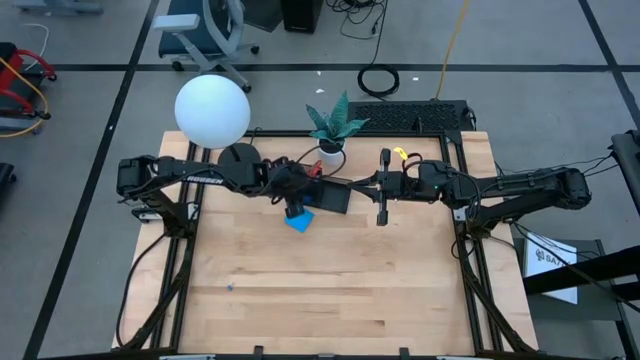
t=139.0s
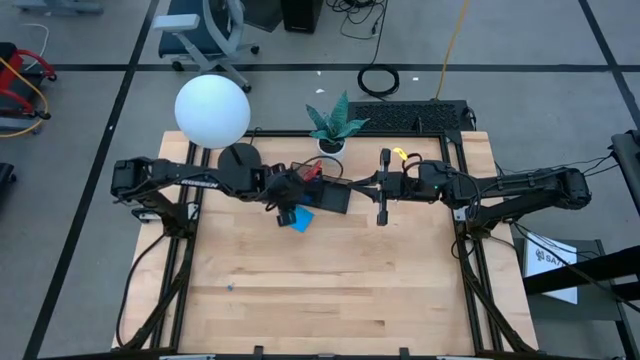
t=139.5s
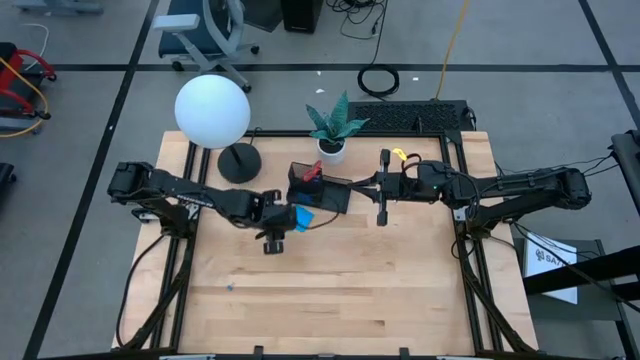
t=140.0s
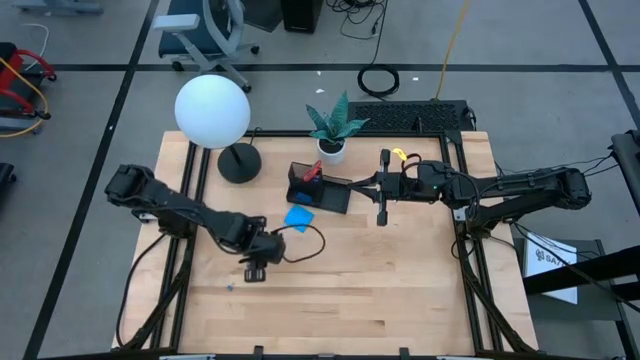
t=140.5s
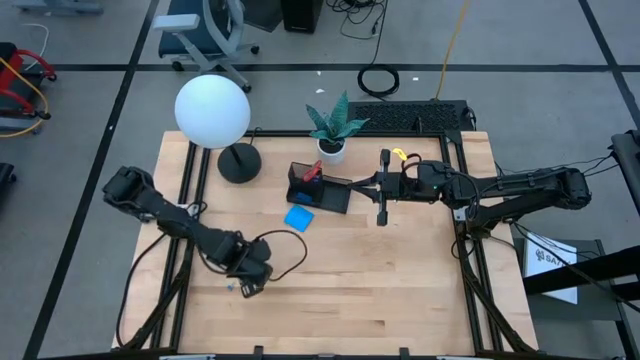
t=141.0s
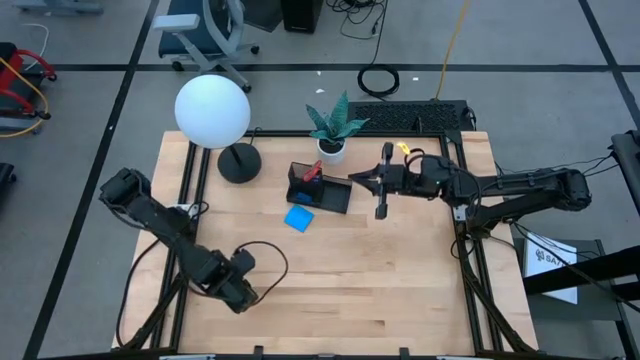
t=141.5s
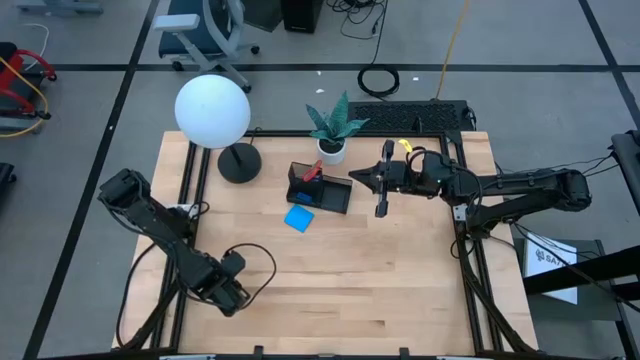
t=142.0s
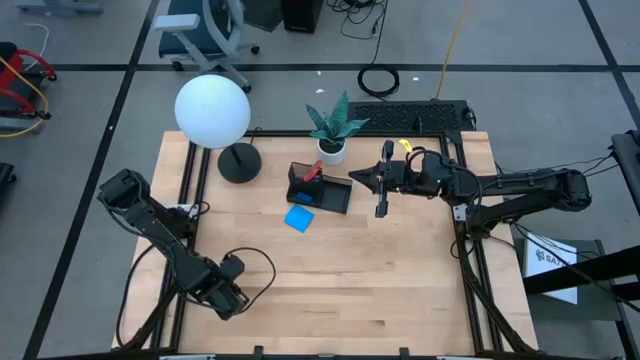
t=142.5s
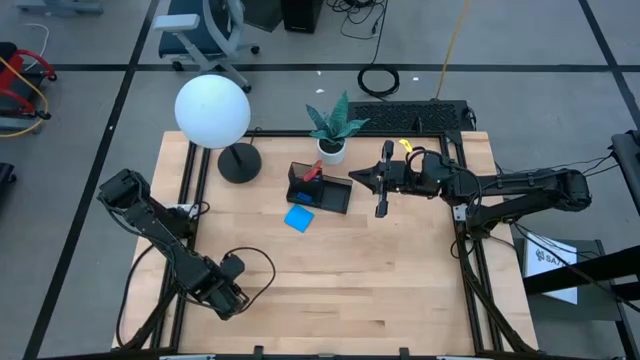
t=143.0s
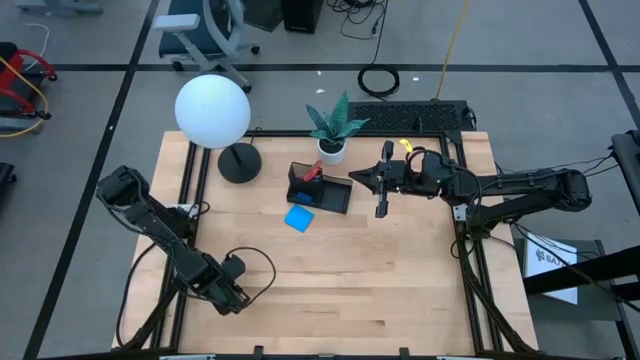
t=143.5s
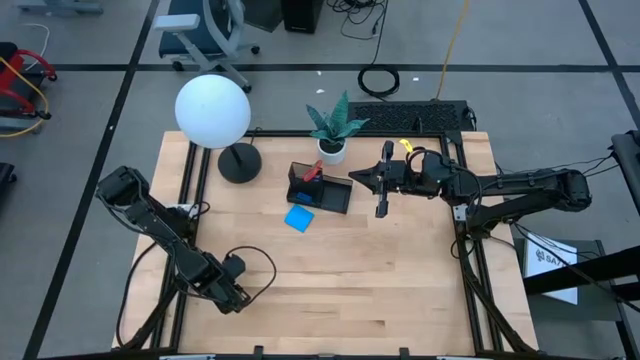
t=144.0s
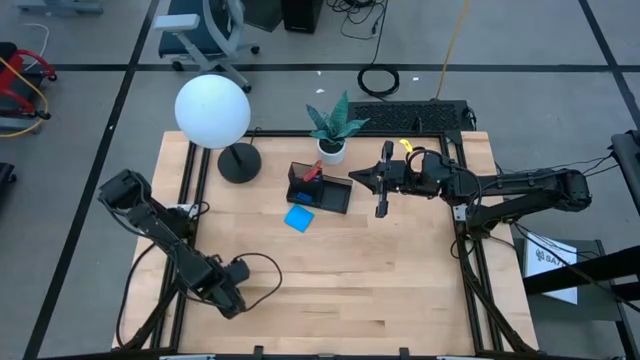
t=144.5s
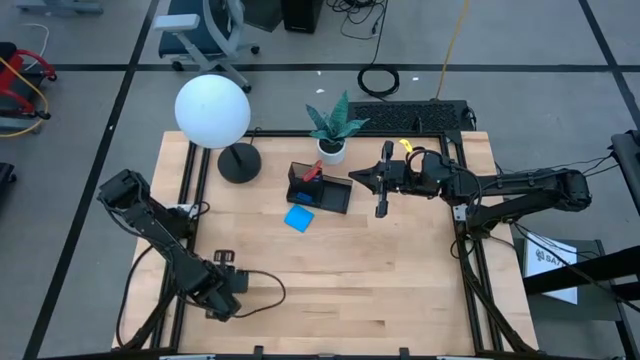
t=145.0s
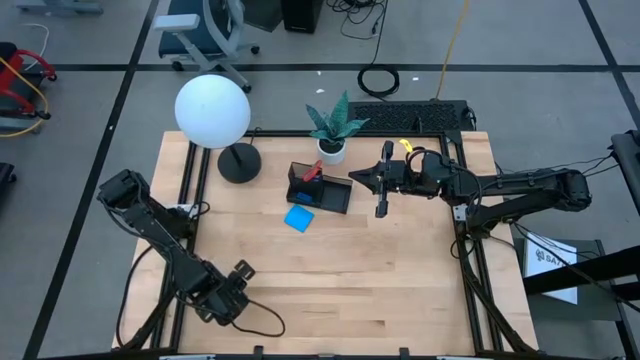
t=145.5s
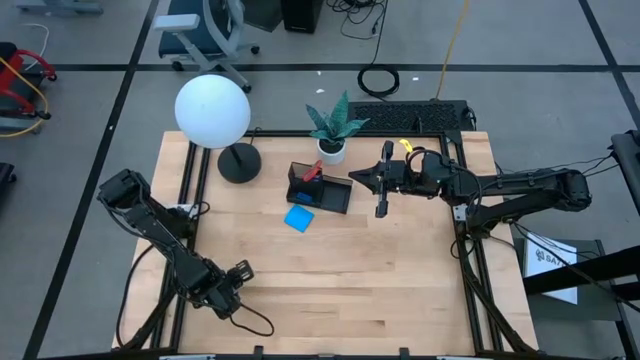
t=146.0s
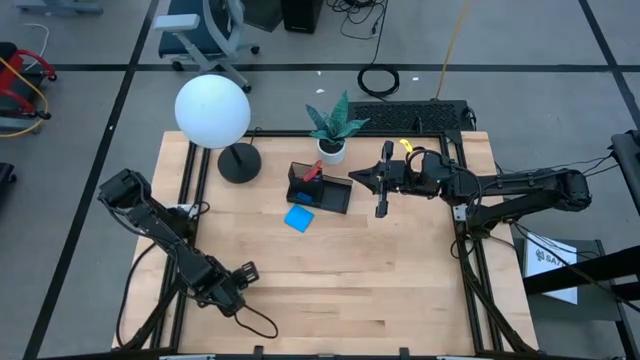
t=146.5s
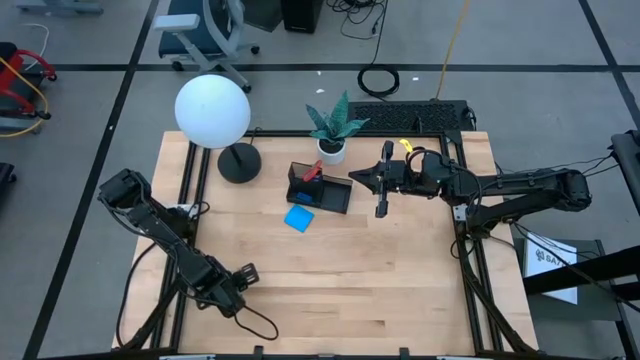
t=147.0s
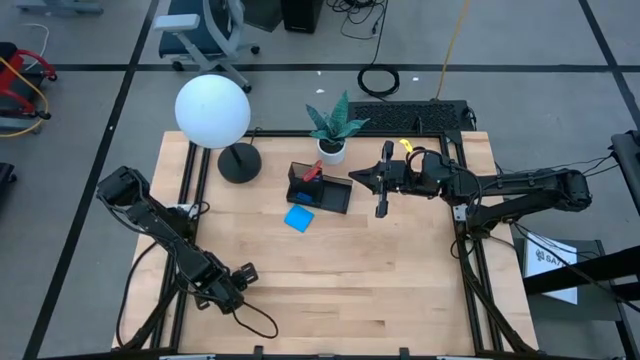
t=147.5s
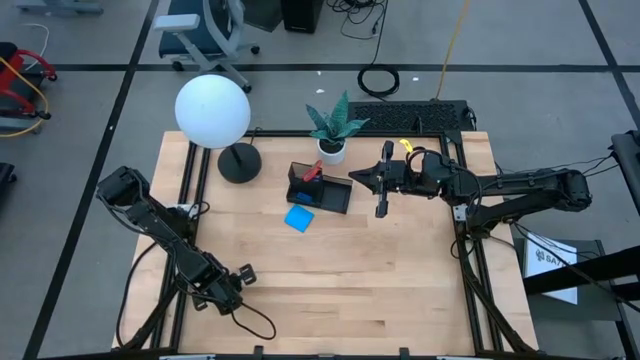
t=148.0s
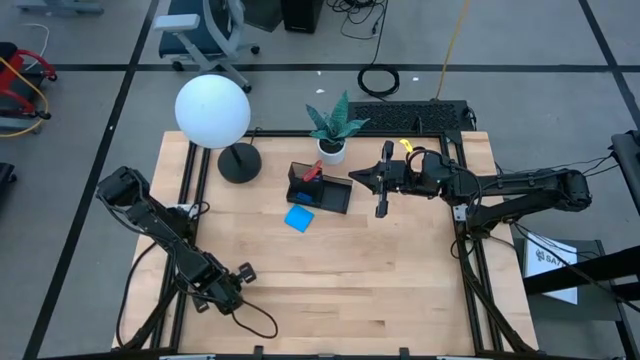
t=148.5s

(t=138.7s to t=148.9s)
Task: Pick and place office supplies into organizer
Put the blue binder clip into the desk organizer

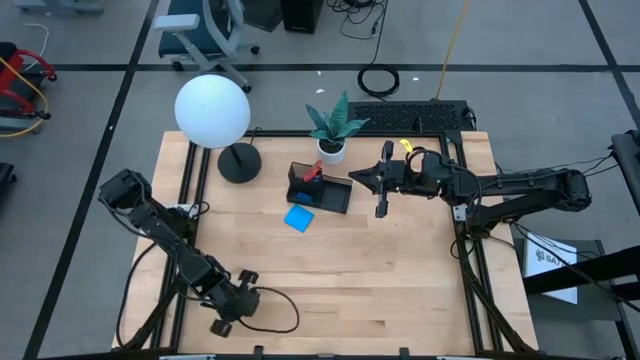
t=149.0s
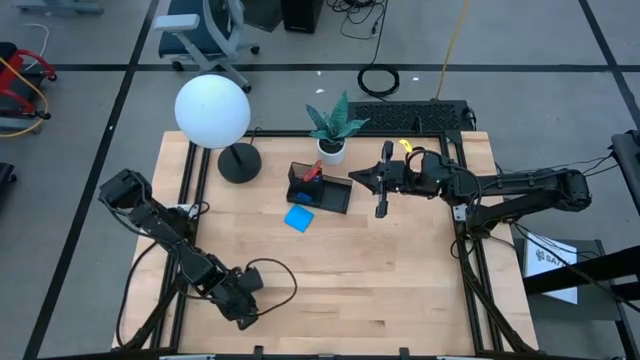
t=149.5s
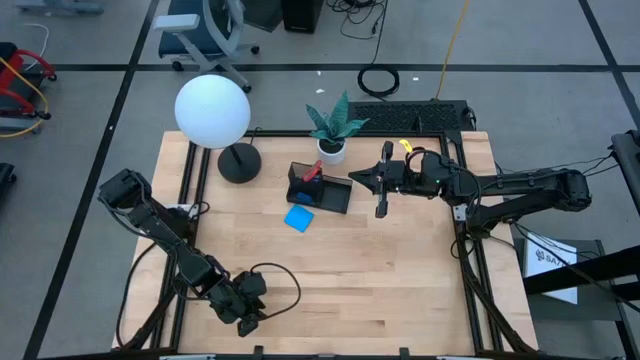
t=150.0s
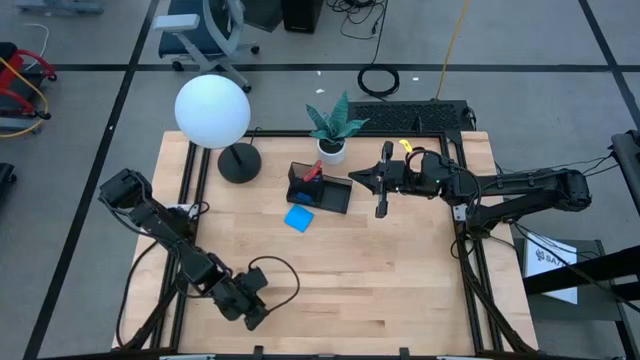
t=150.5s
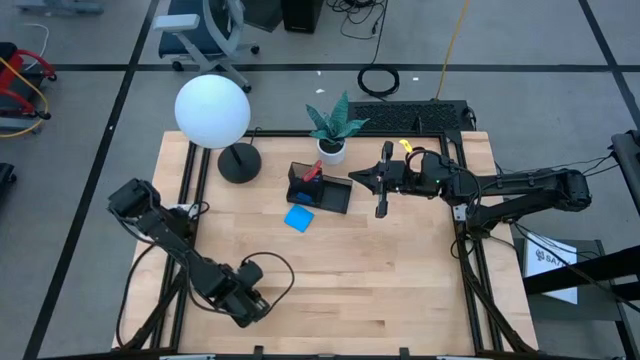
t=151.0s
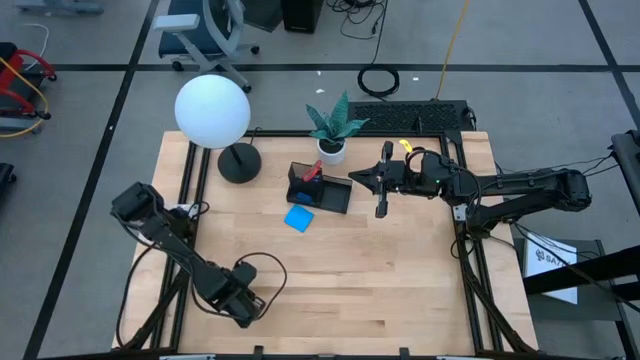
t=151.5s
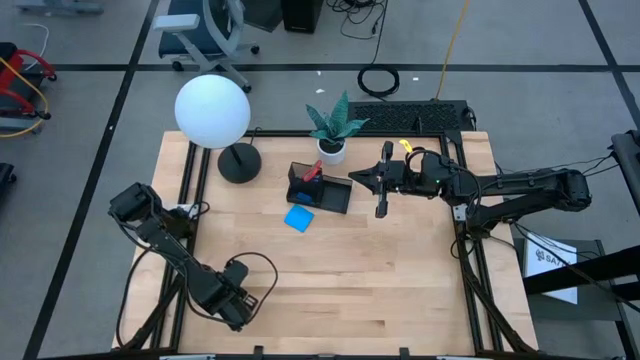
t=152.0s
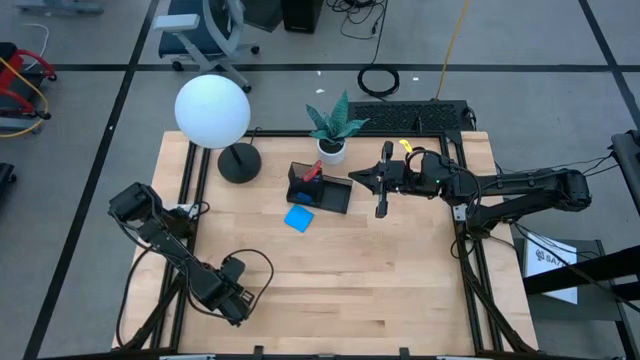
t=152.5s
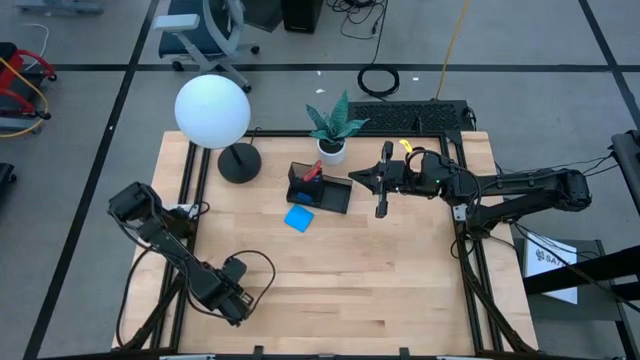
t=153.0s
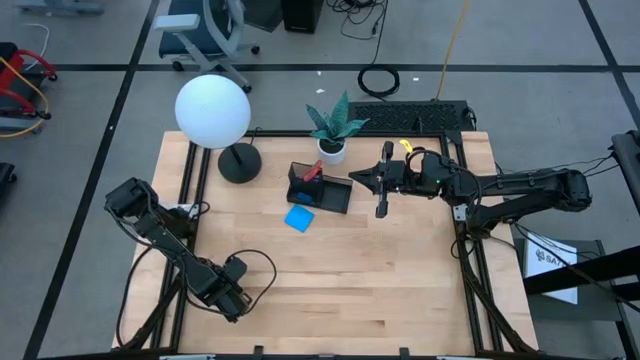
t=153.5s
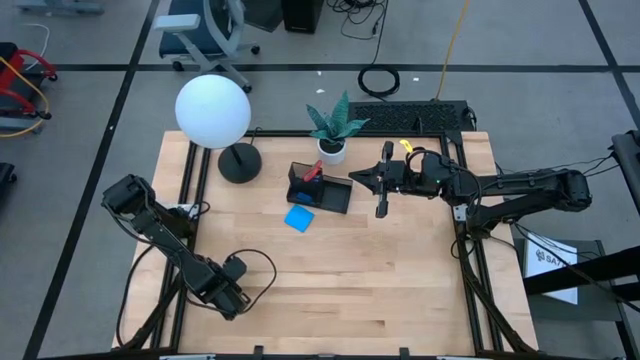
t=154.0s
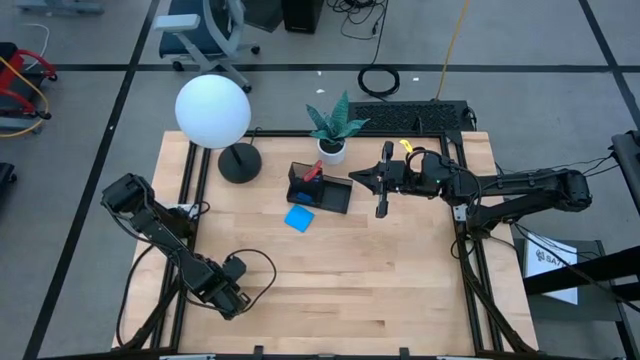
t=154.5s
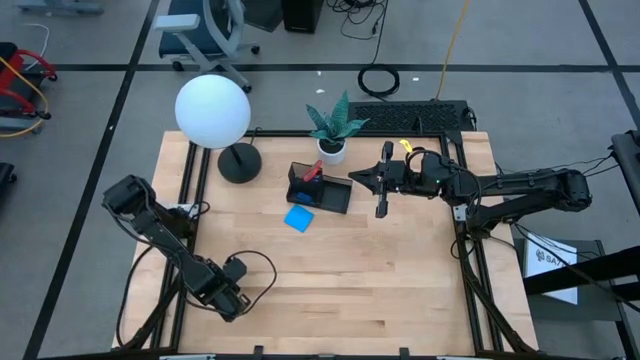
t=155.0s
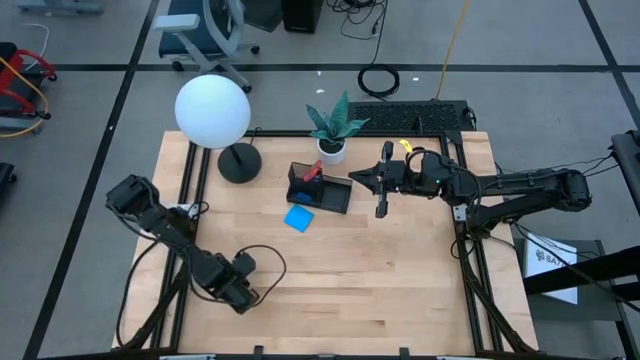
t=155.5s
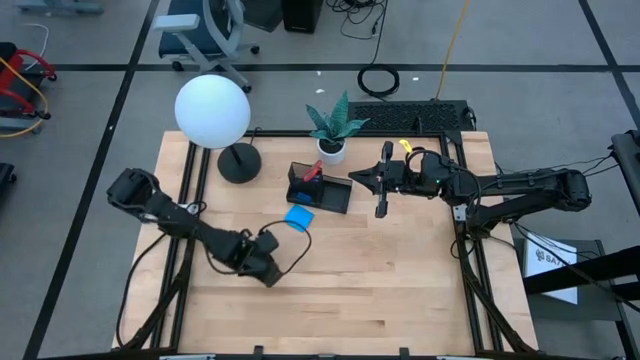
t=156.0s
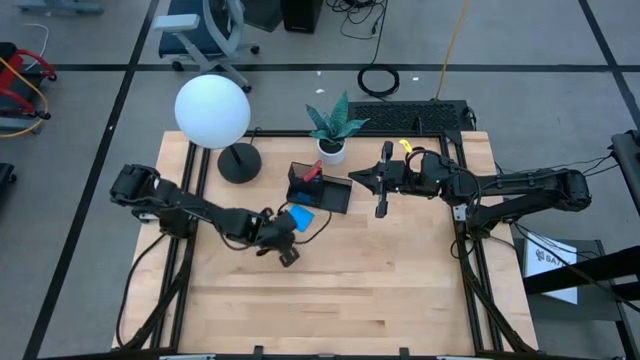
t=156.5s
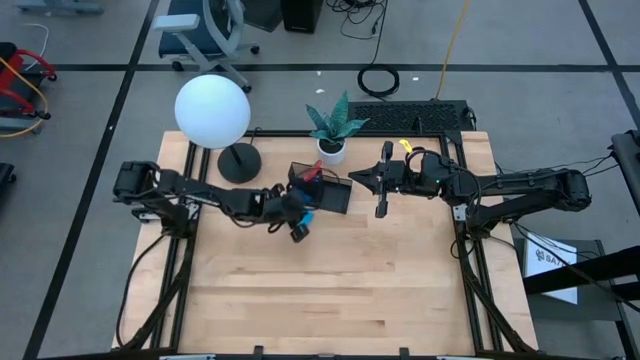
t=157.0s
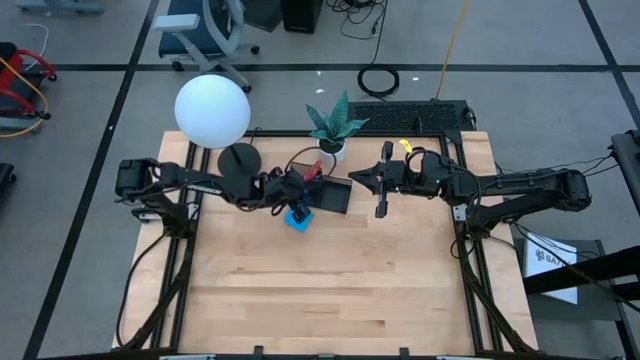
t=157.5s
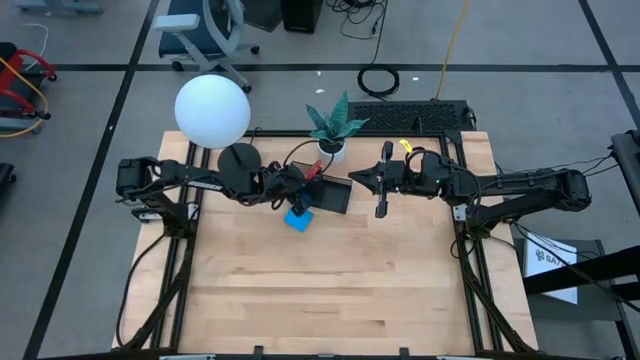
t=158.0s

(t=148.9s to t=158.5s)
Put the blue binder clip into the desk organizer

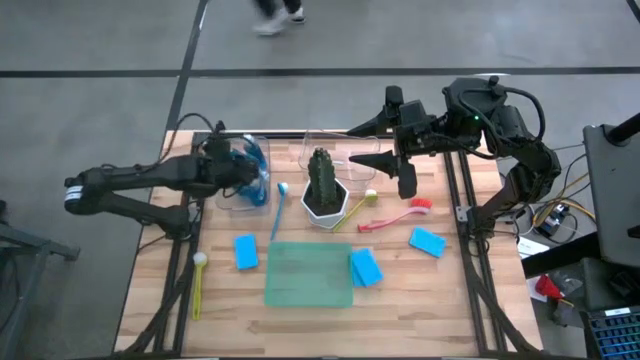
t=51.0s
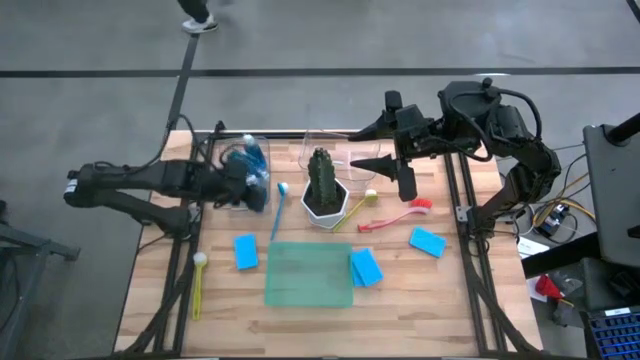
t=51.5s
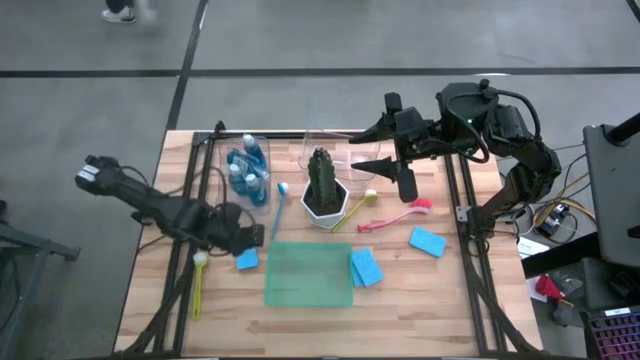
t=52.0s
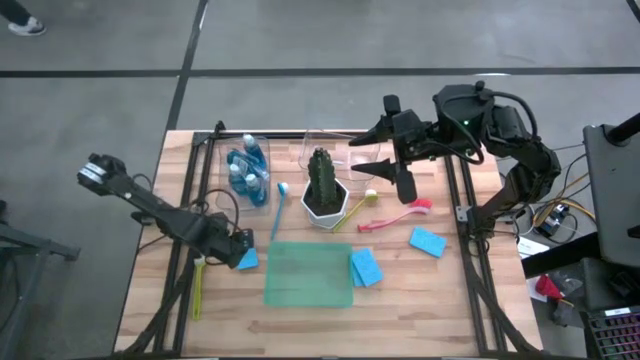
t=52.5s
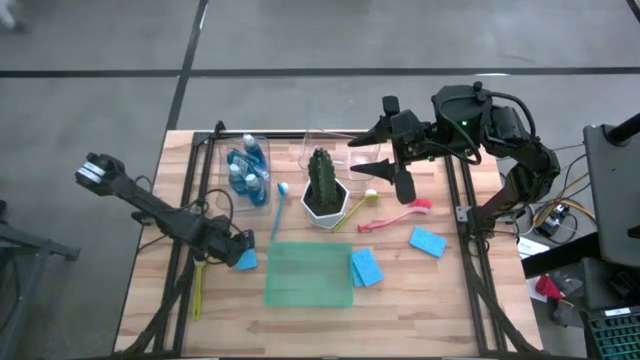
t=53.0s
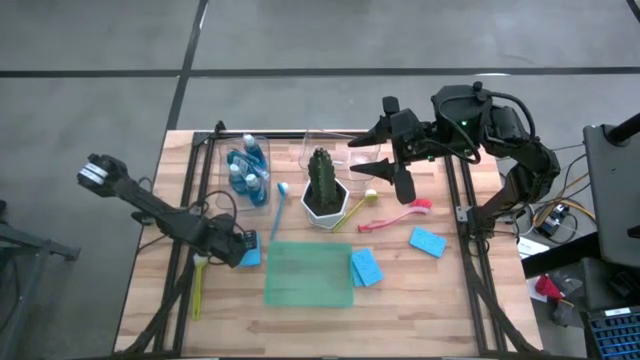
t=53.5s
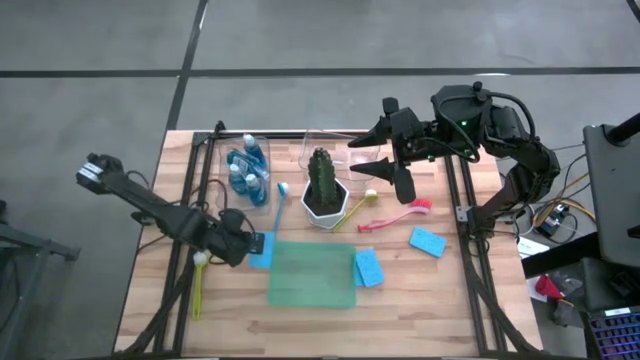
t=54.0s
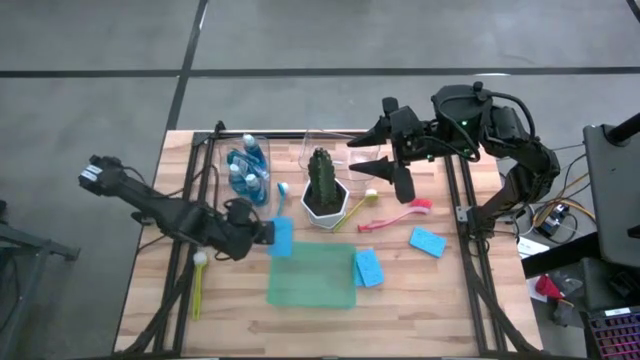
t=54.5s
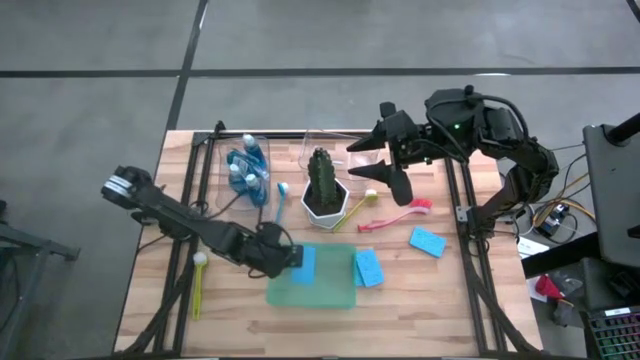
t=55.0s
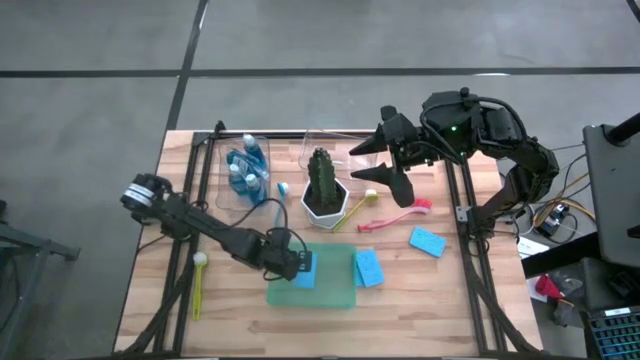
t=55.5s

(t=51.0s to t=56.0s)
Task: Pick & Place Kitchen Sink Supplies
Put the blue sponge into the green bin
